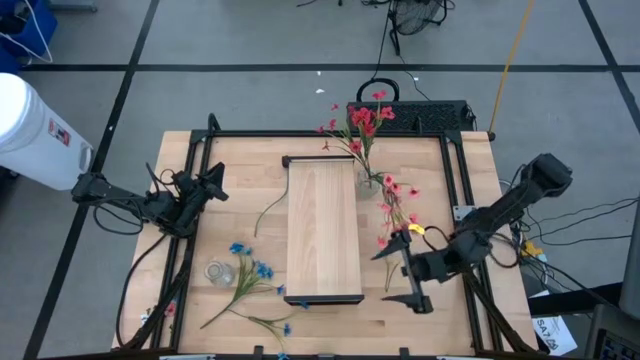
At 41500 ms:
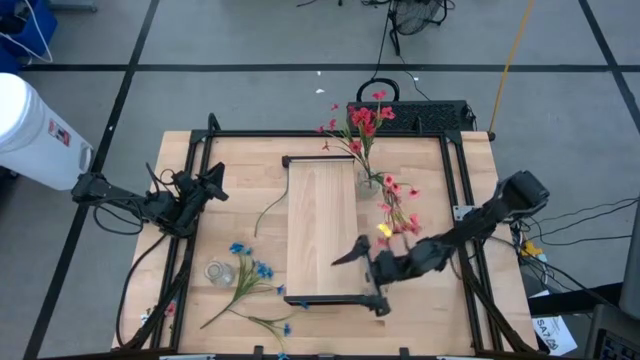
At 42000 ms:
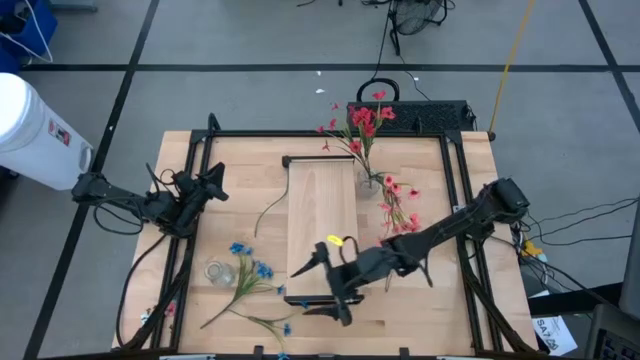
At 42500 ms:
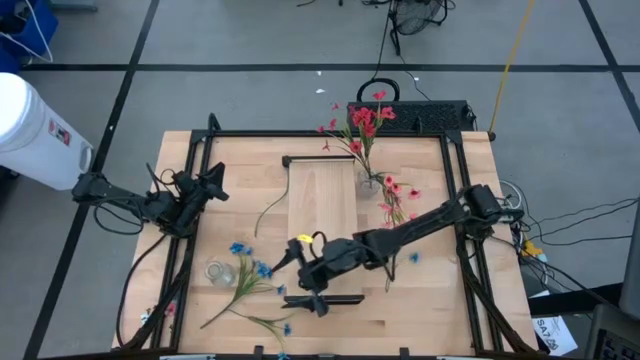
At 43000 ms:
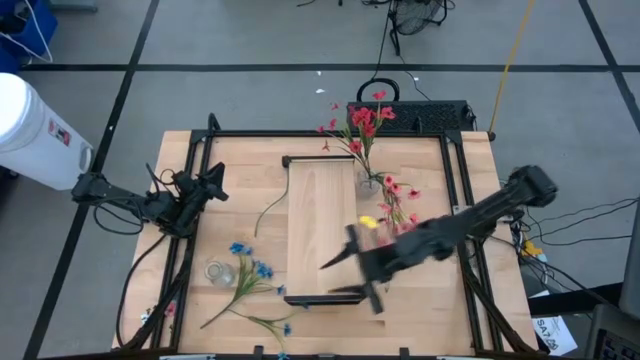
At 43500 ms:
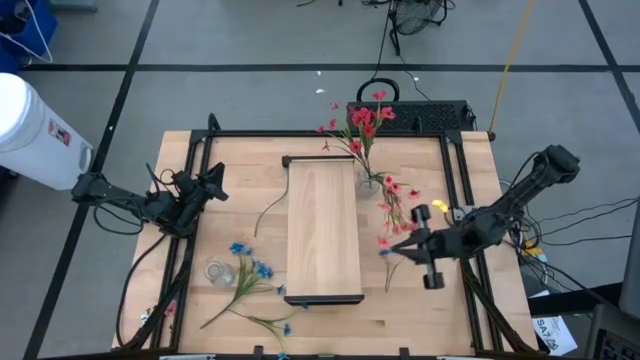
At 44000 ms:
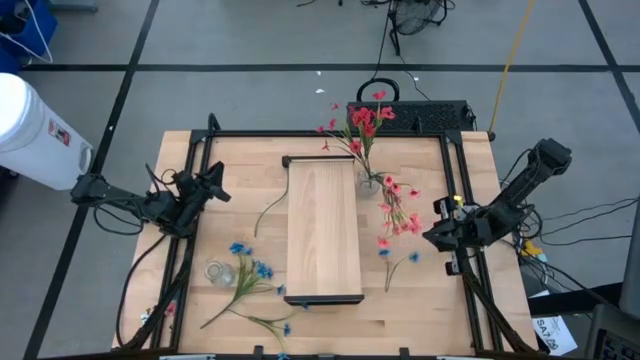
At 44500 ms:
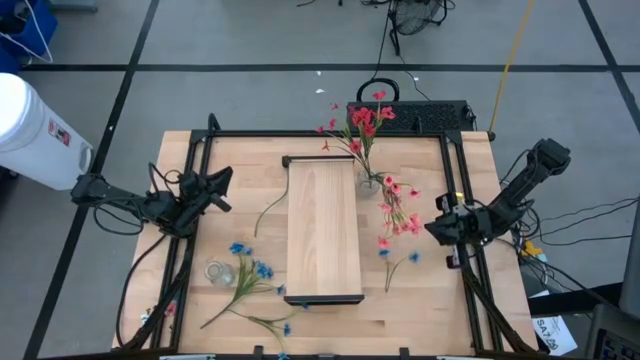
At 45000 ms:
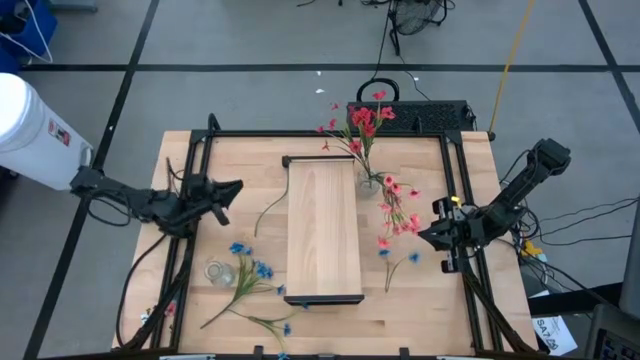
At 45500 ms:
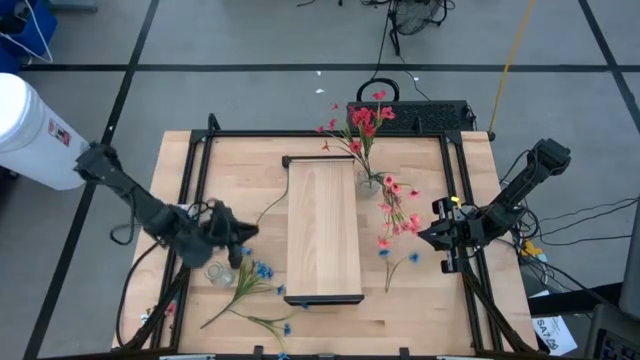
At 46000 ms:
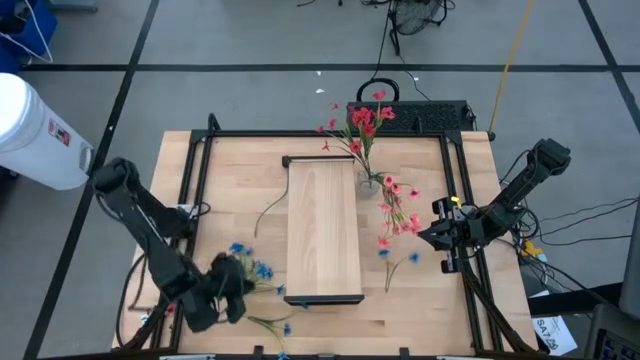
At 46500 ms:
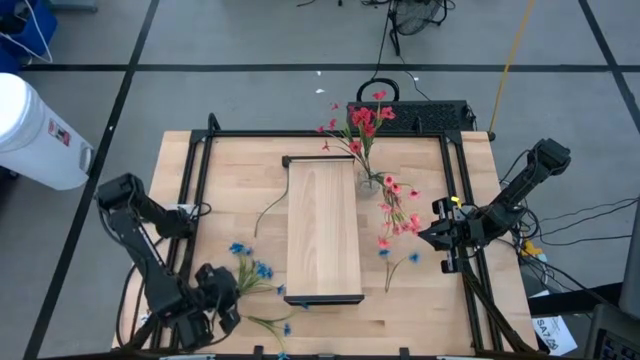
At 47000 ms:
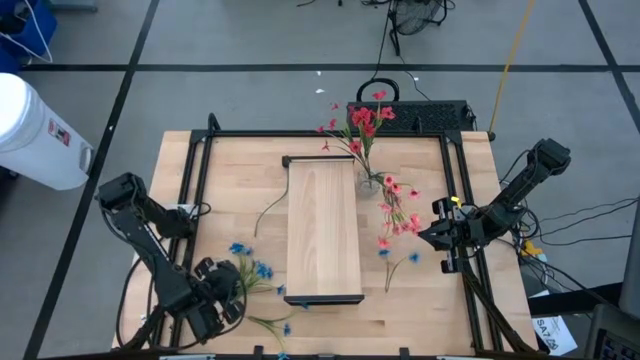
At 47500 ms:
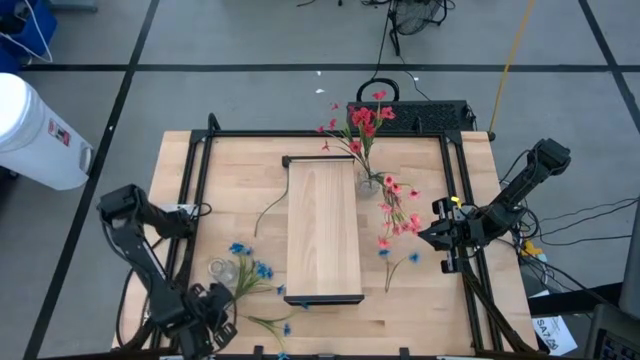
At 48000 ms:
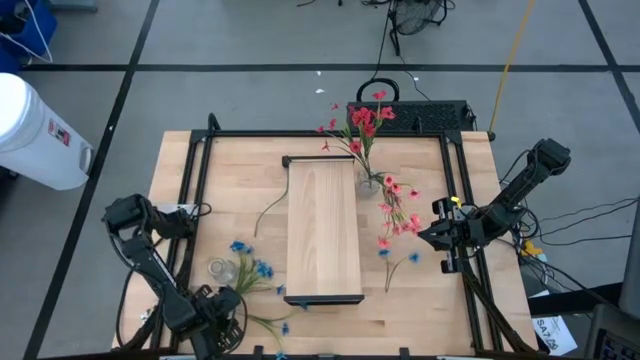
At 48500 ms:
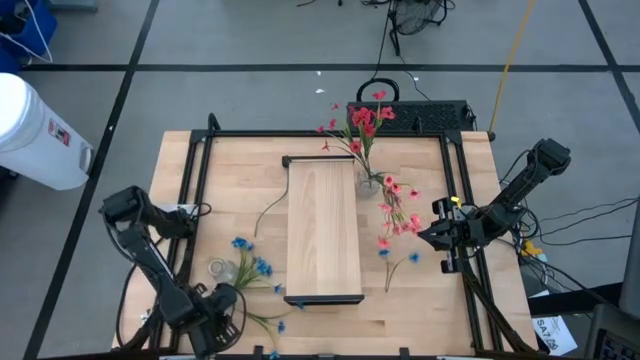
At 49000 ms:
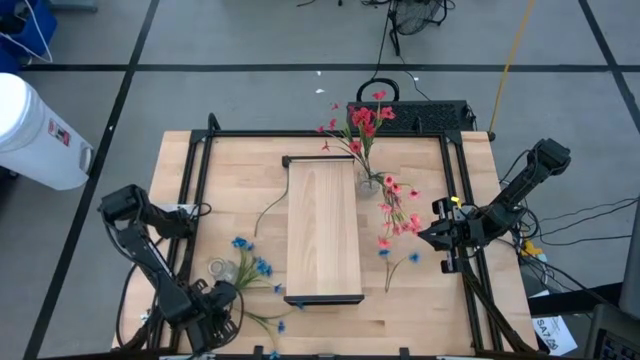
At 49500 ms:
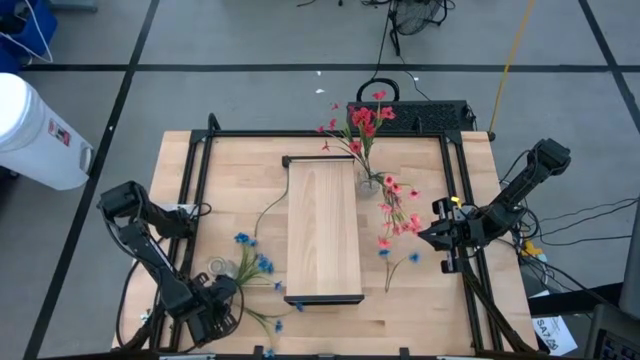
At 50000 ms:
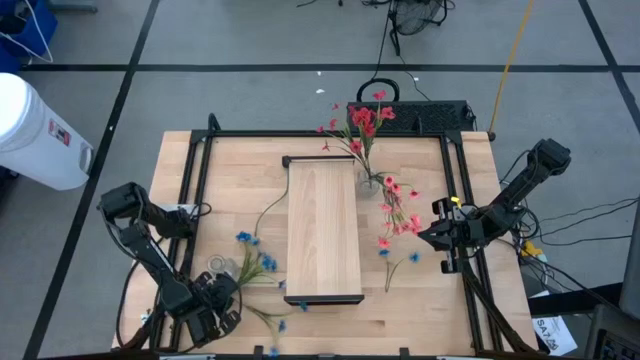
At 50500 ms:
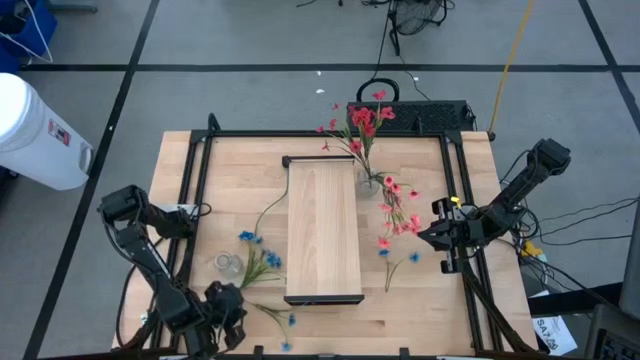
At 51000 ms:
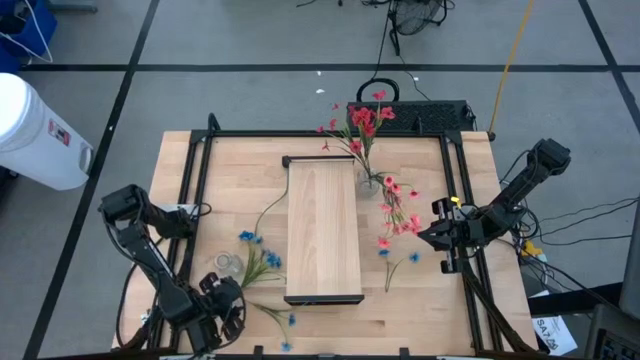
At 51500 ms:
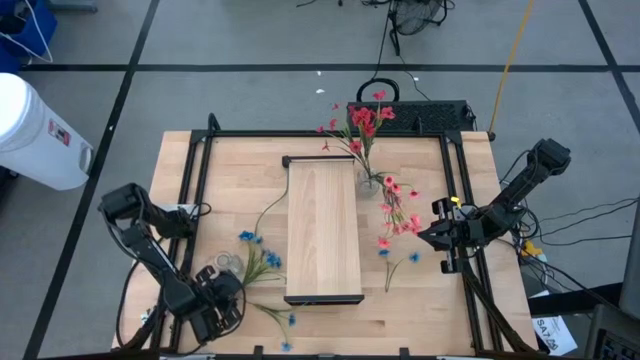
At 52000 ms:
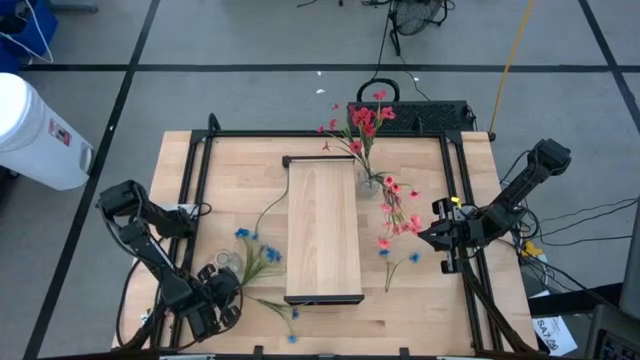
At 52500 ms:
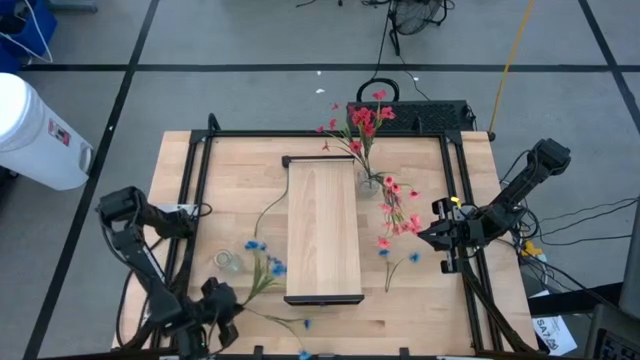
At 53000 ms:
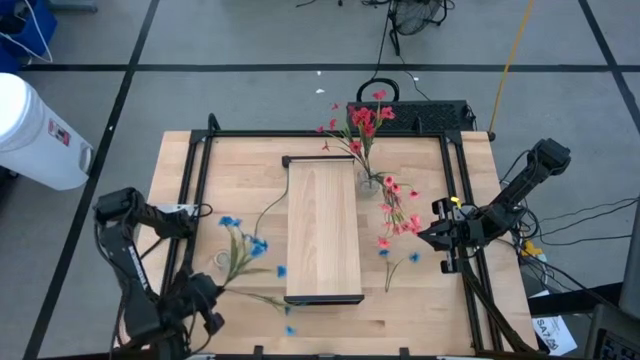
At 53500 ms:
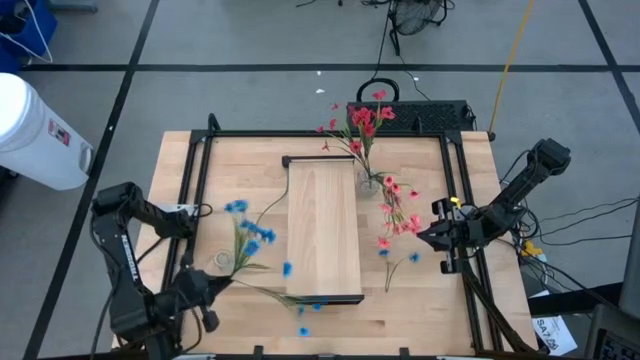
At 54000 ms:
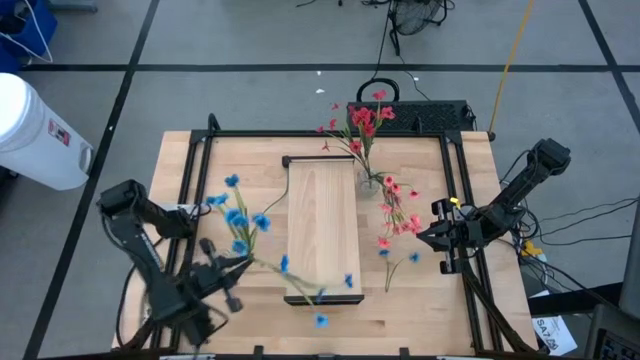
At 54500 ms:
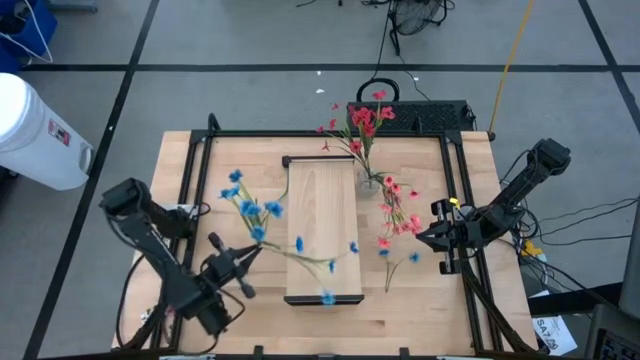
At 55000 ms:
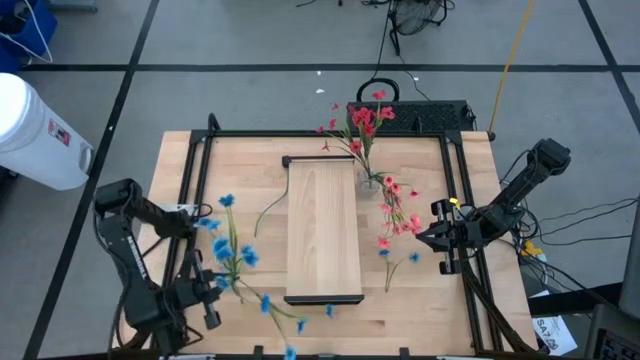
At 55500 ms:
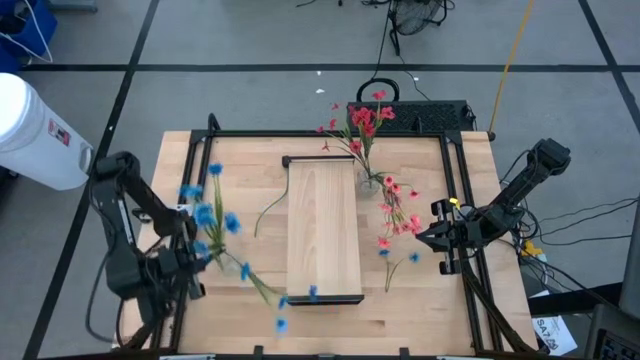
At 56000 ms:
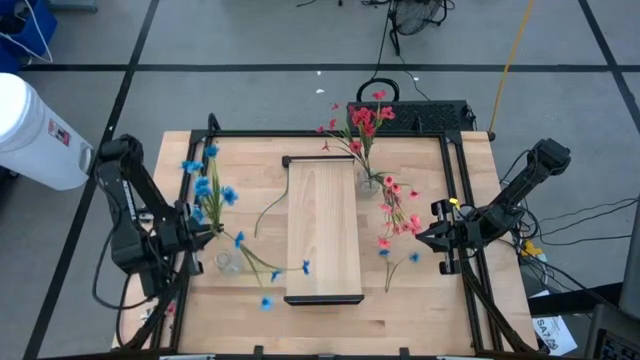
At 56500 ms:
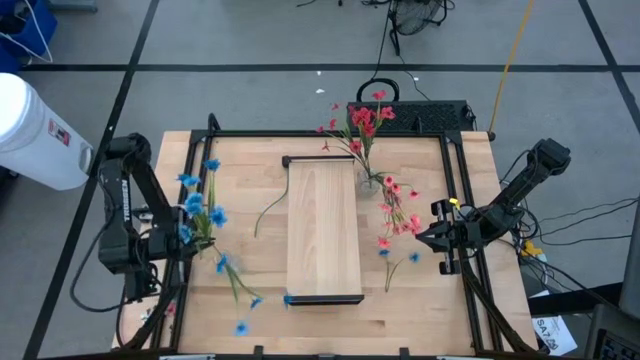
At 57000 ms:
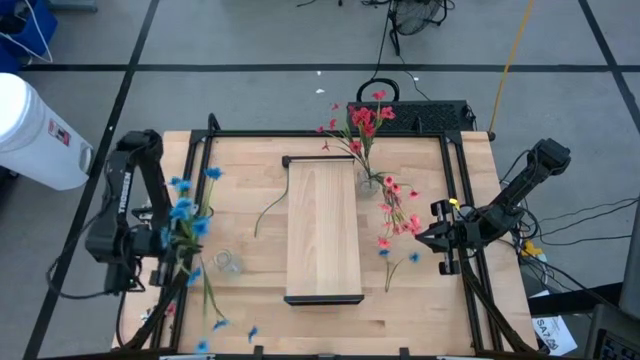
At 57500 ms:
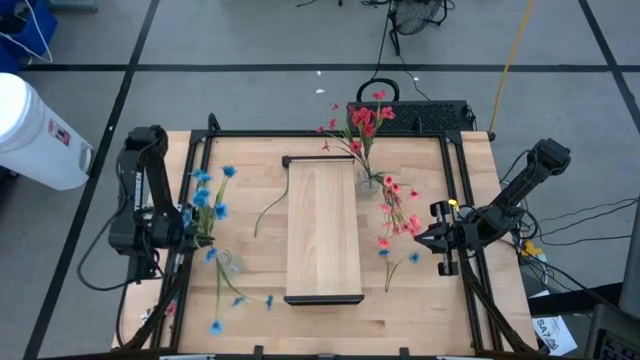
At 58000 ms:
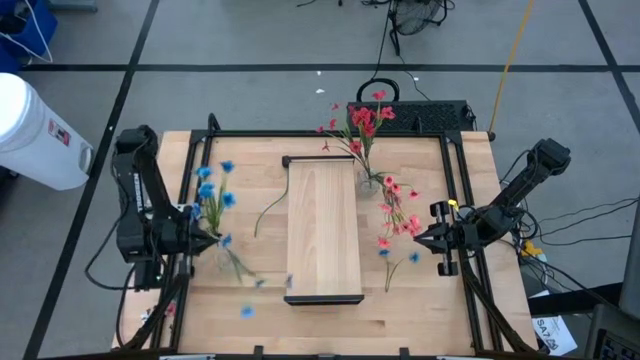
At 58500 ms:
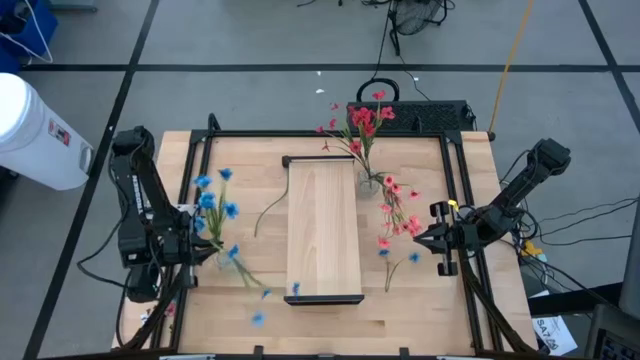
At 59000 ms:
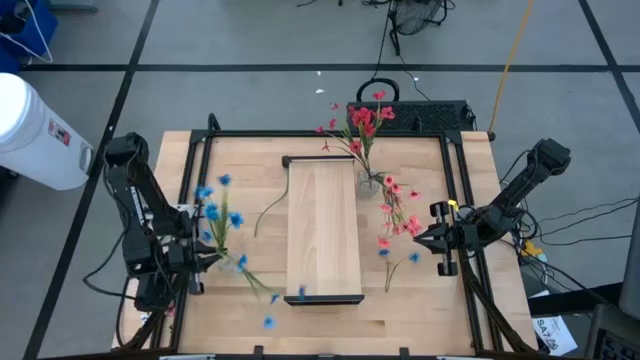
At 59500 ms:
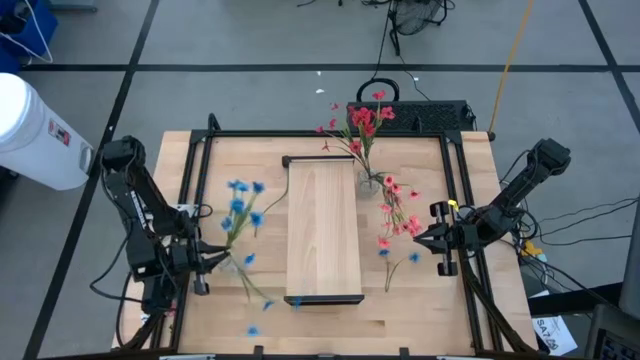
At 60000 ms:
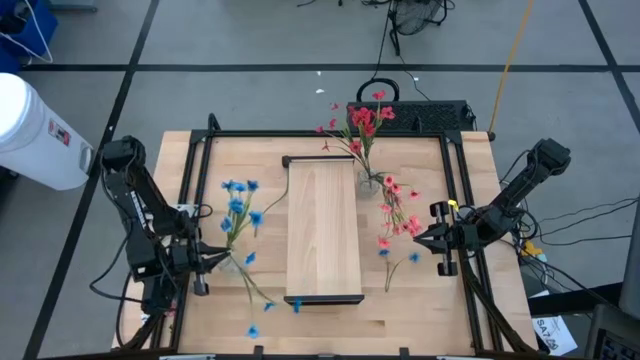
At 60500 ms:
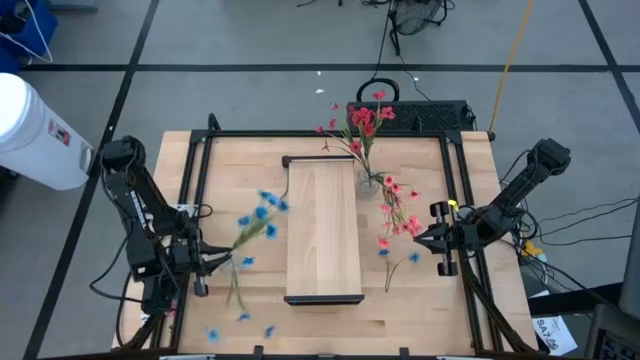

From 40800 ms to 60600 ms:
Task: Pick and place flowers into a vace then onto a shelf
Put the left blue flowers into the left transparent vase
